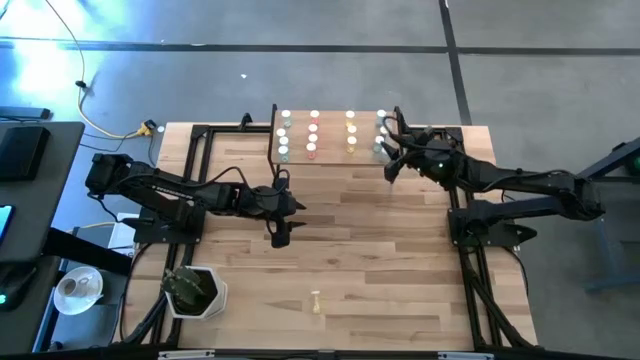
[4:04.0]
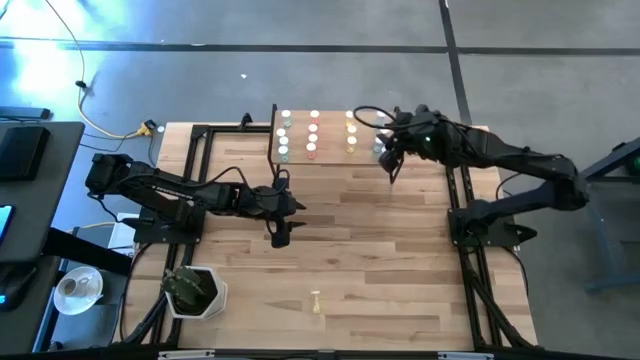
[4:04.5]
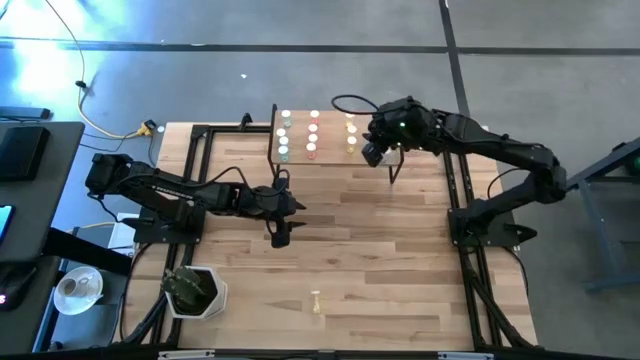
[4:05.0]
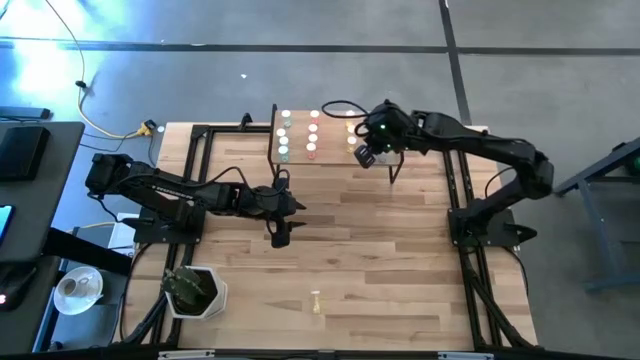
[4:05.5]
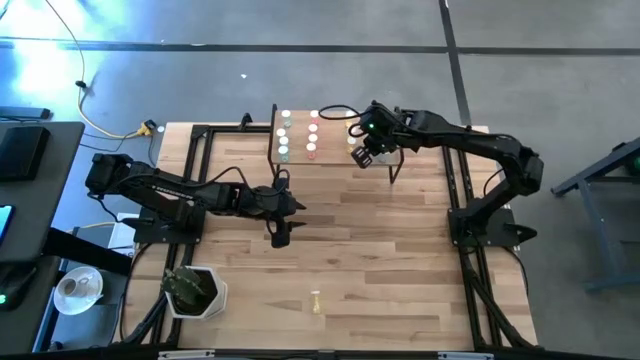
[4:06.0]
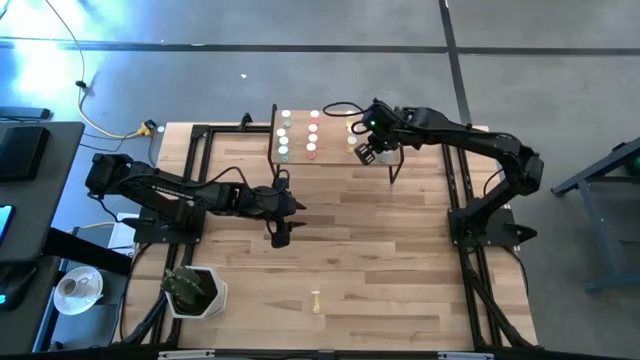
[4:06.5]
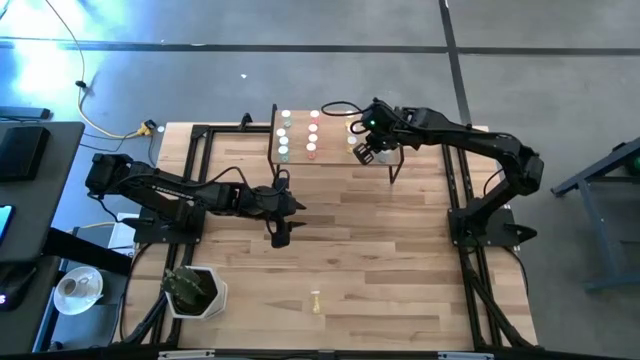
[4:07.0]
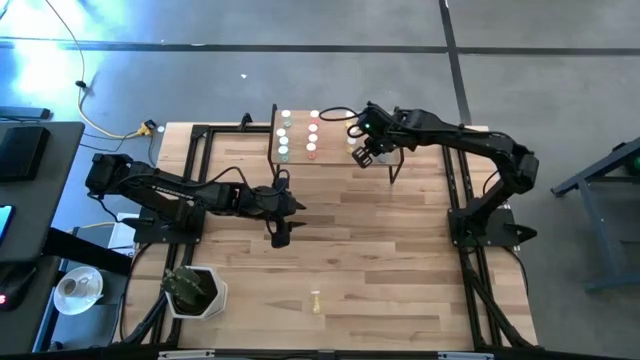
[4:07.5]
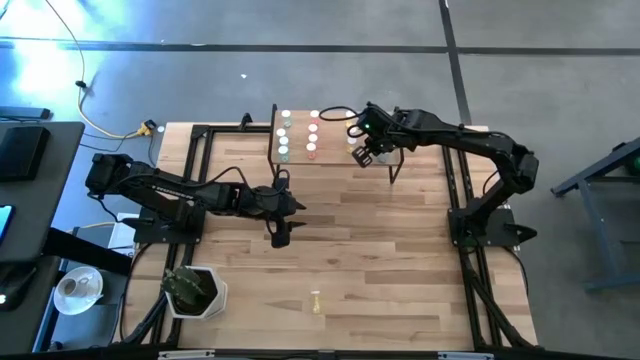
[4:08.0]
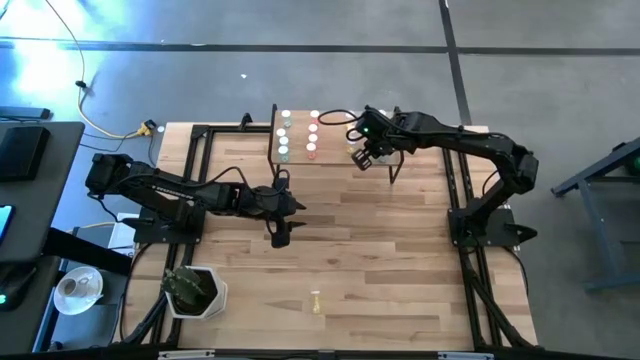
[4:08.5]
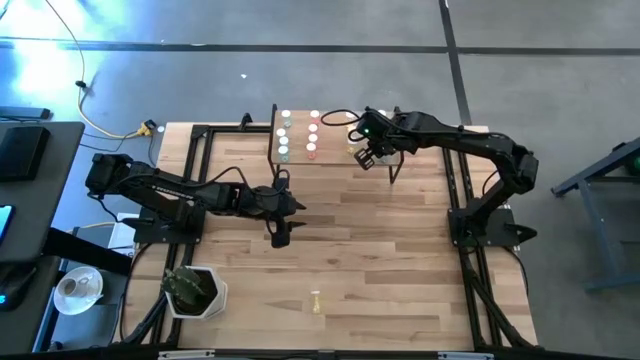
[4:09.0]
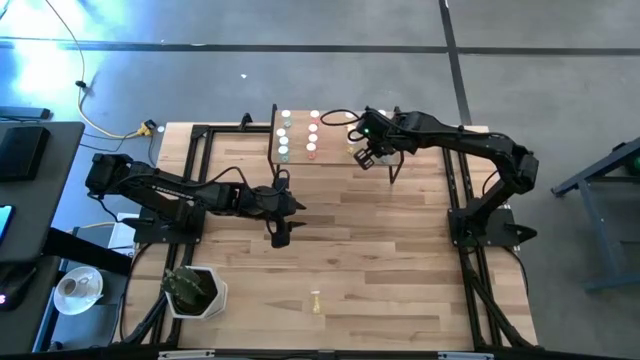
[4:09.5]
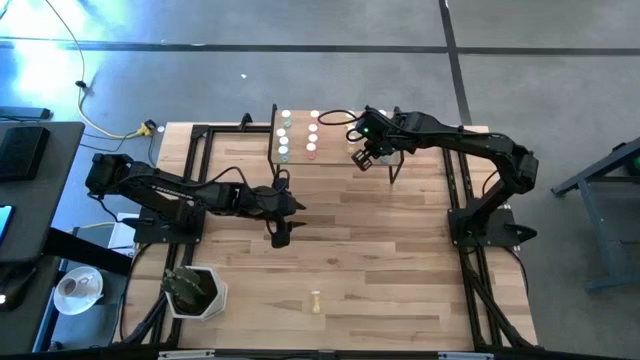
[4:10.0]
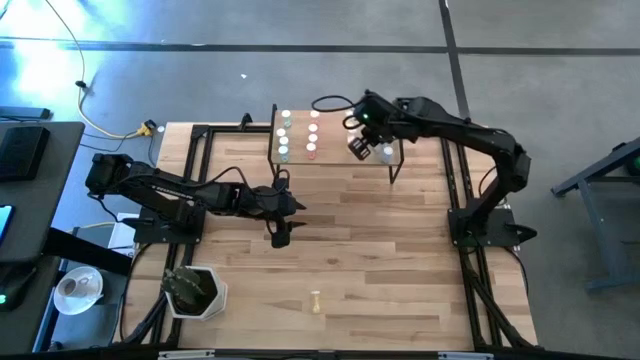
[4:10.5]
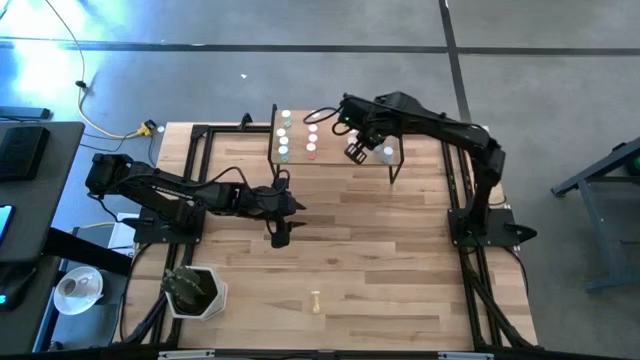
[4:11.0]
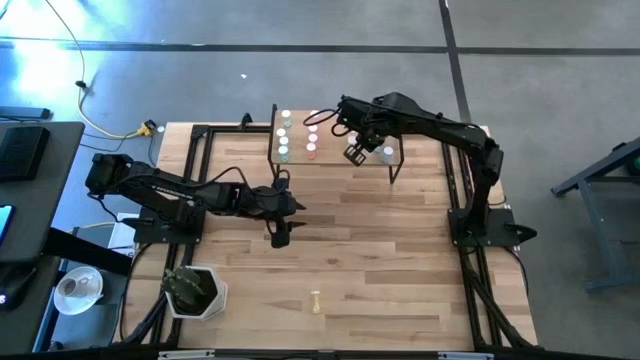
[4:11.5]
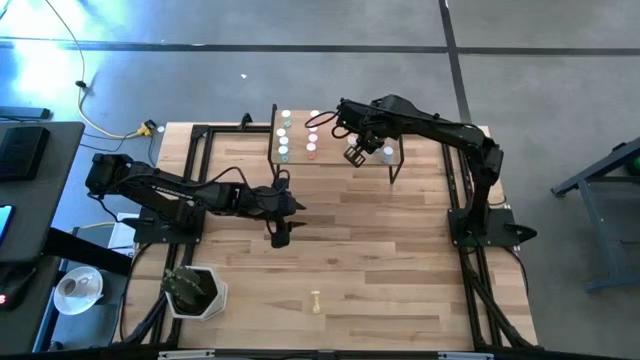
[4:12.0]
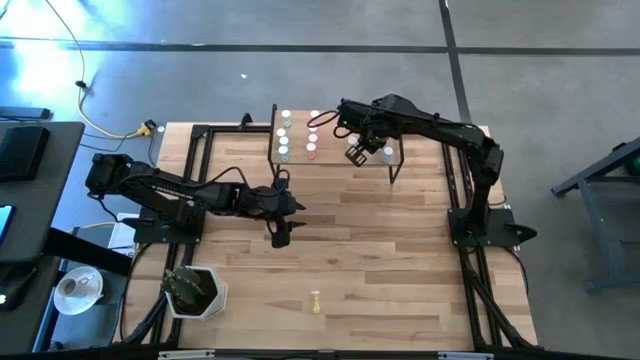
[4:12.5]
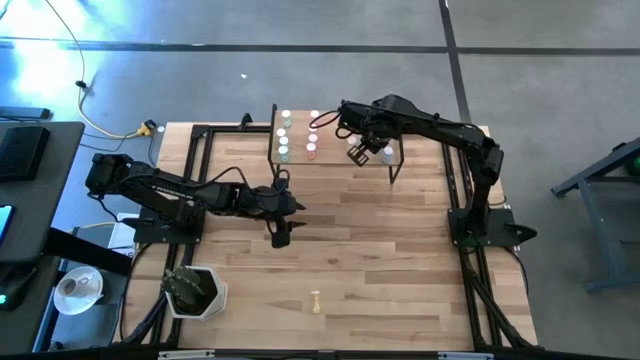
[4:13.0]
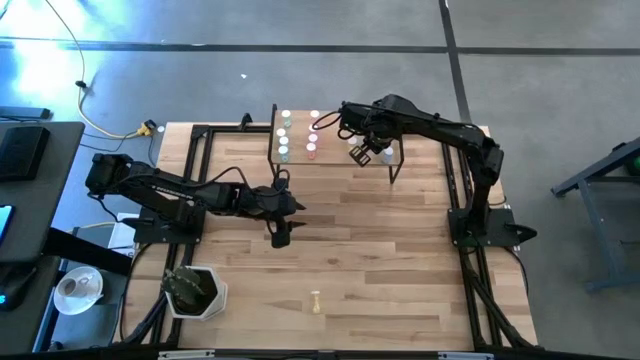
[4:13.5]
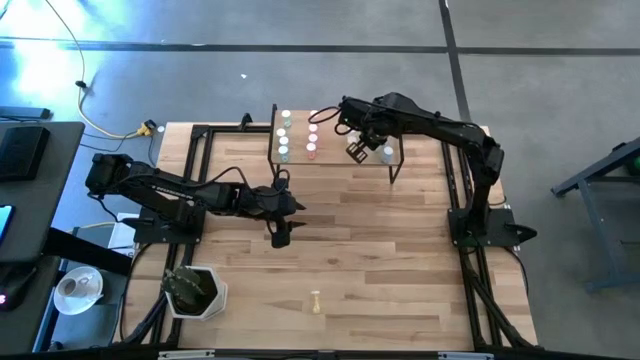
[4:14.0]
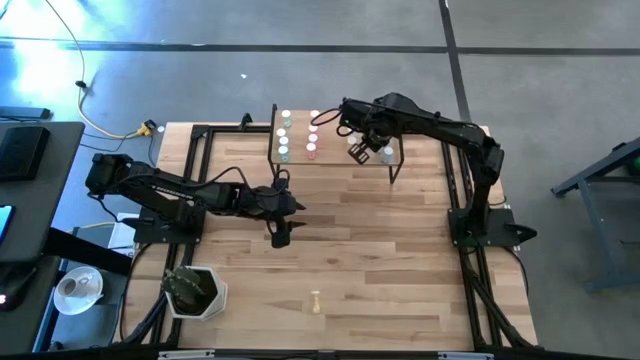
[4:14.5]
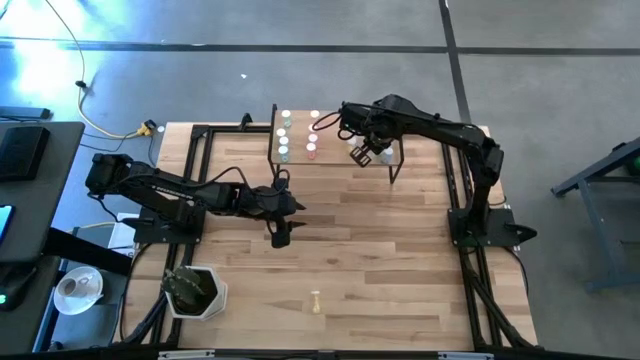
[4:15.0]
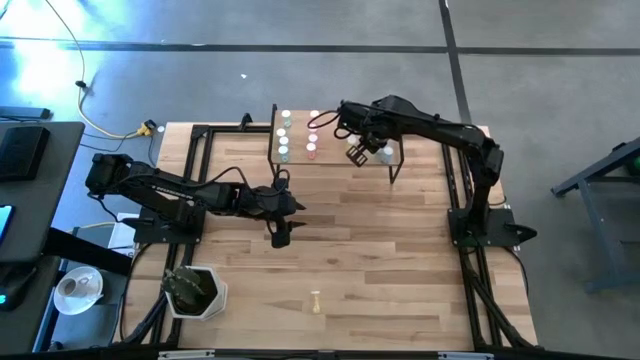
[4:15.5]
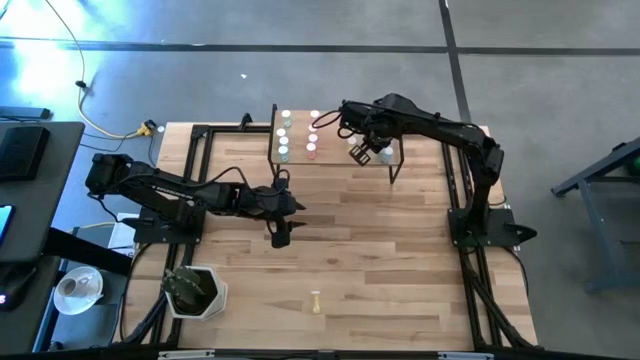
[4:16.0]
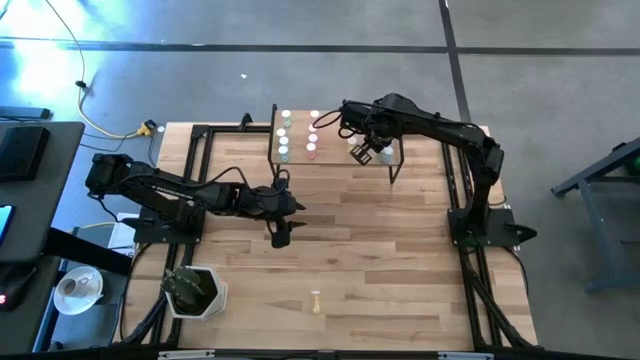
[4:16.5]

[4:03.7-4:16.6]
Task: Pick and place medicine bottles onto shelf by color
Adjust the blue pill bottle on the shelf

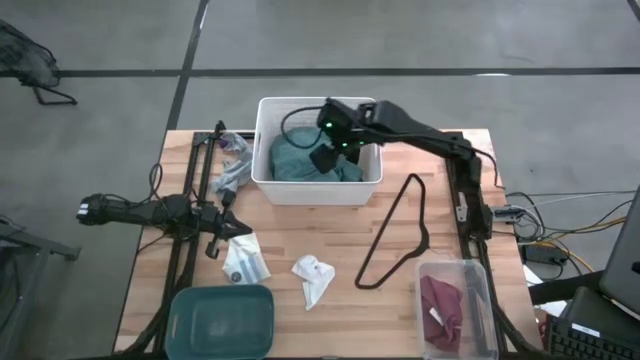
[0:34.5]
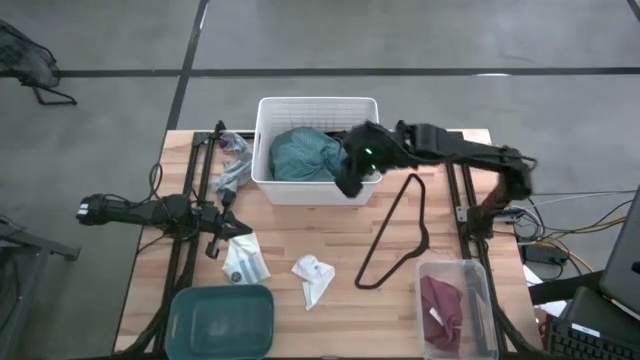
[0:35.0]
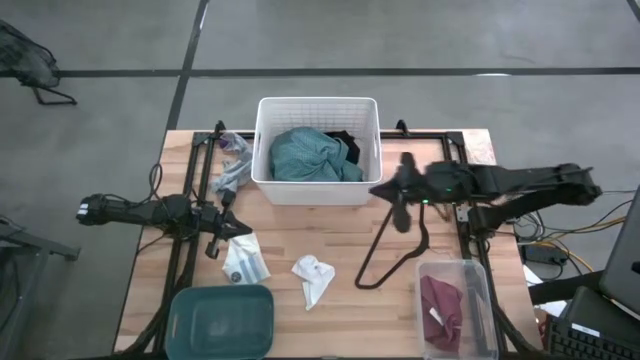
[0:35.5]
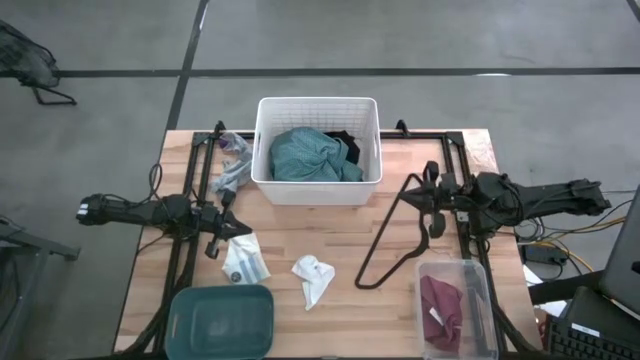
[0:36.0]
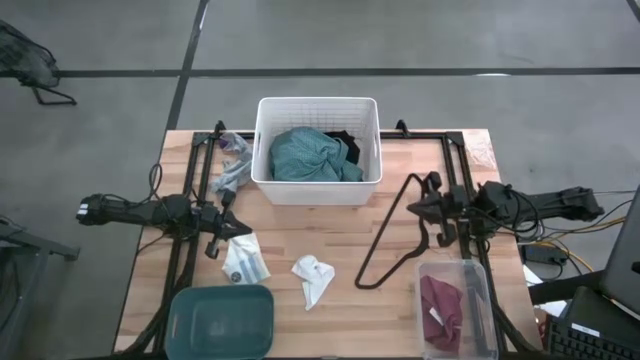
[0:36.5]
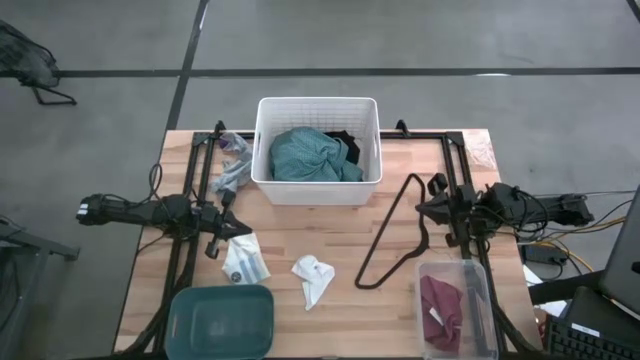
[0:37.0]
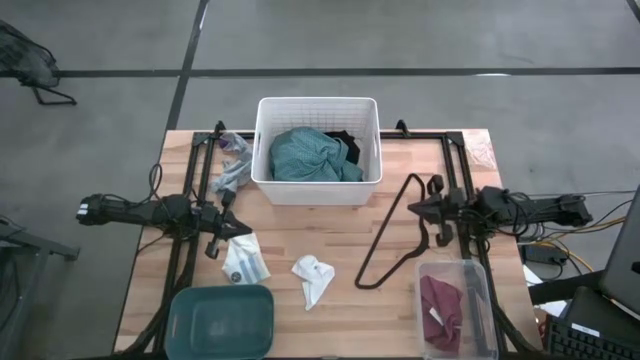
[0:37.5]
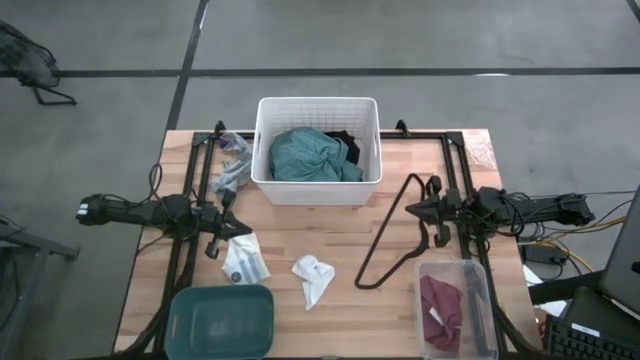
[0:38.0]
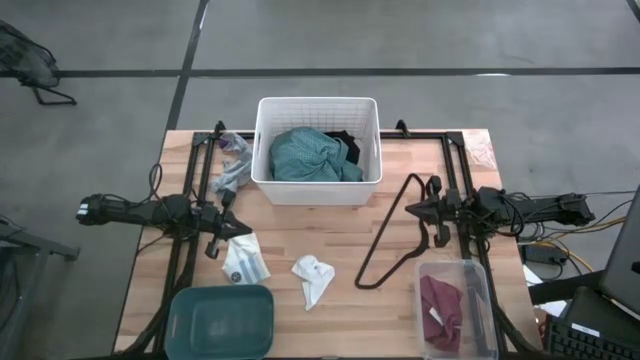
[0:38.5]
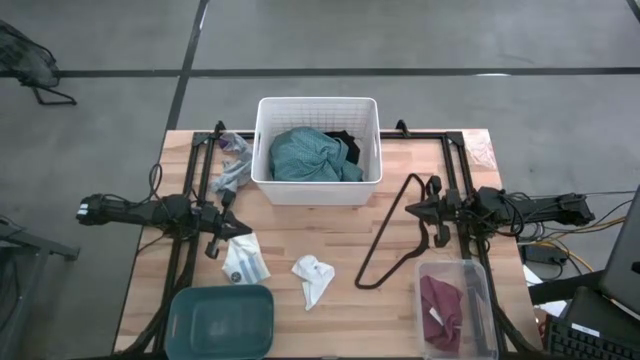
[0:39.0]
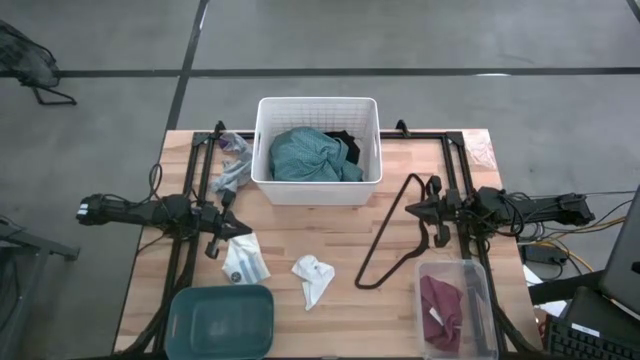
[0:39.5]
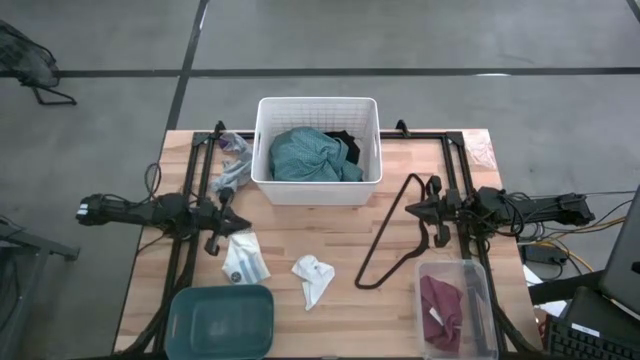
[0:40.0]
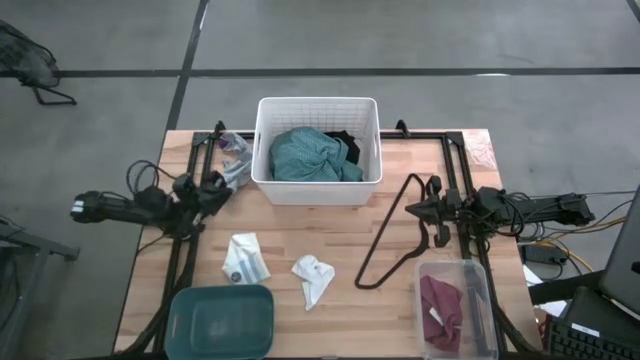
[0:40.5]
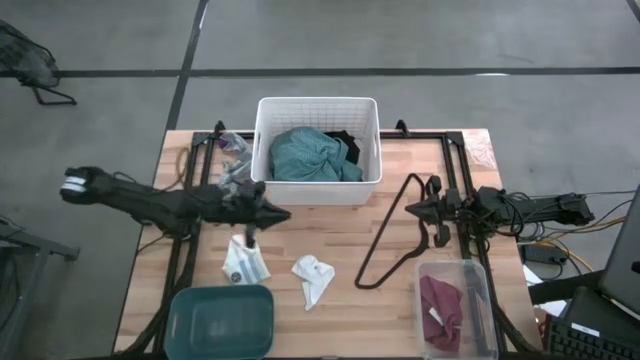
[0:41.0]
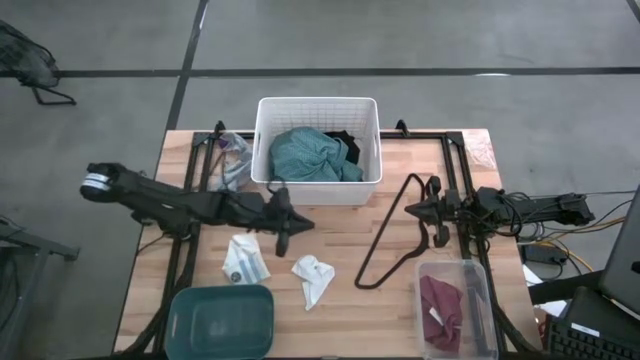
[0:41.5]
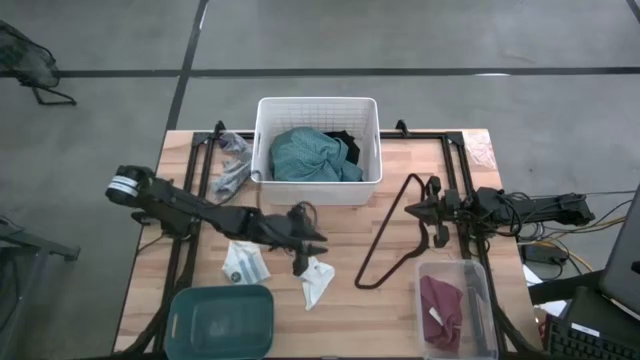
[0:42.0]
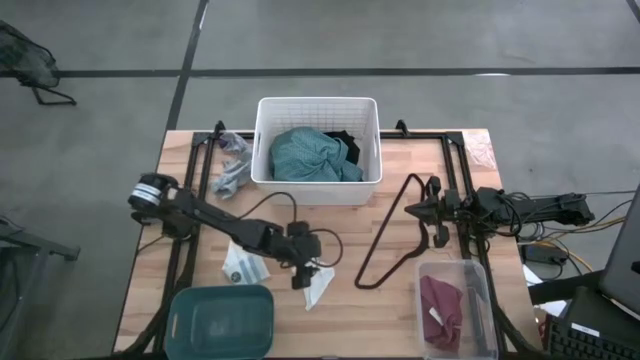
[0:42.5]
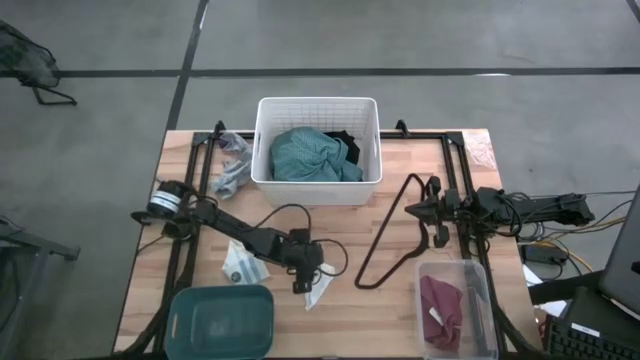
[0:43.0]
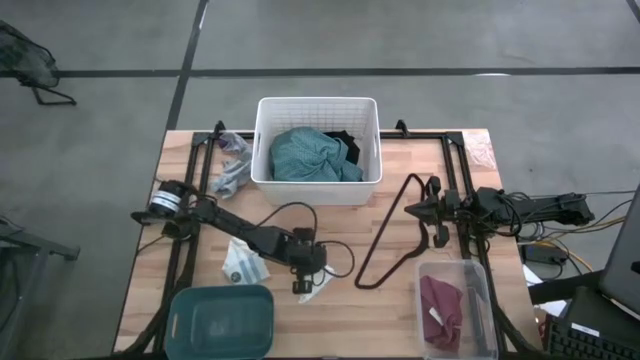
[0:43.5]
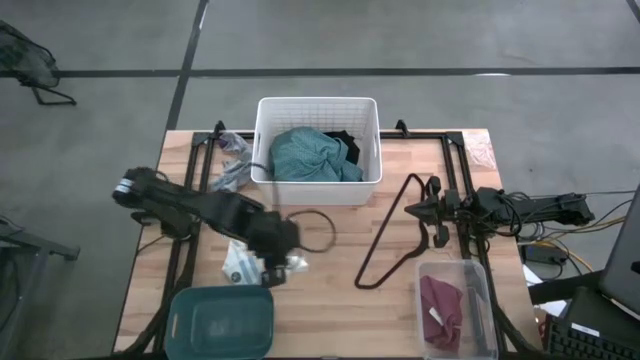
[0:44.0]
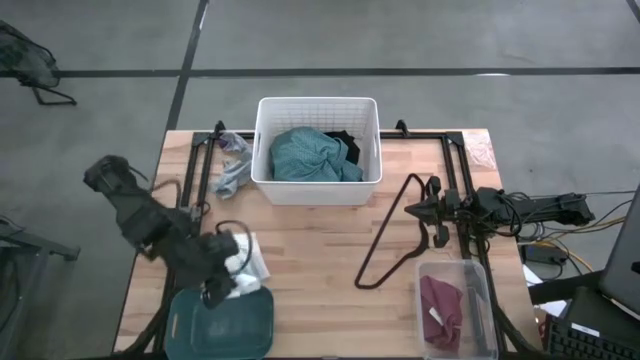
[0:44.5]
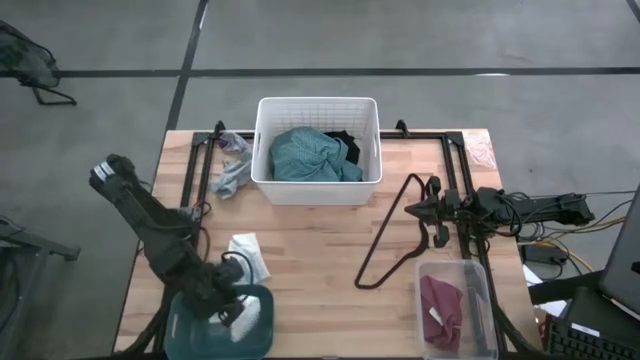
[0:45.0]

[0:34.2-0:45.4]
Task: Pick & Place Cloths
Put the white sock into the green bin
